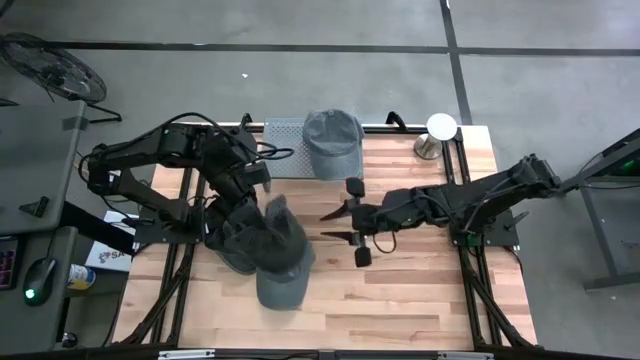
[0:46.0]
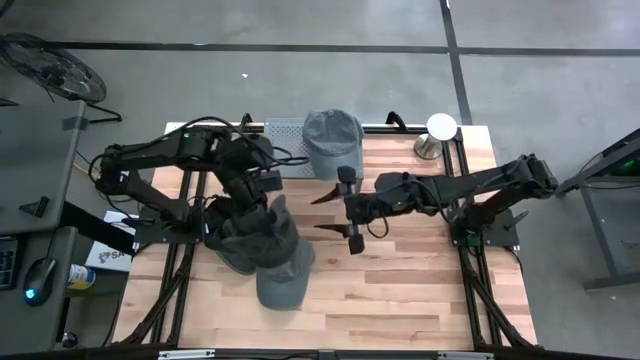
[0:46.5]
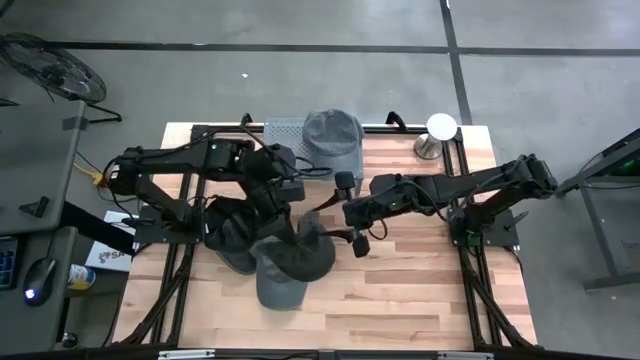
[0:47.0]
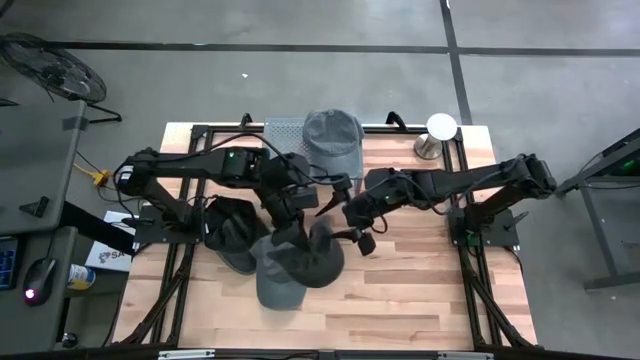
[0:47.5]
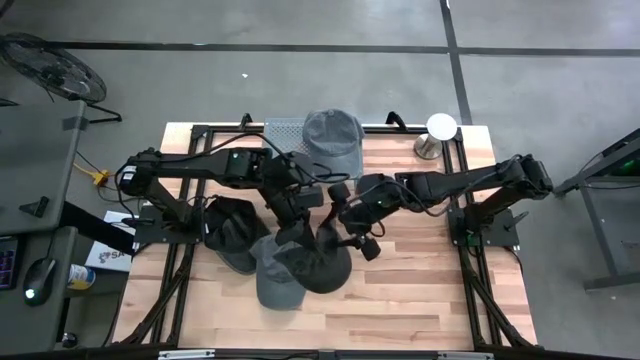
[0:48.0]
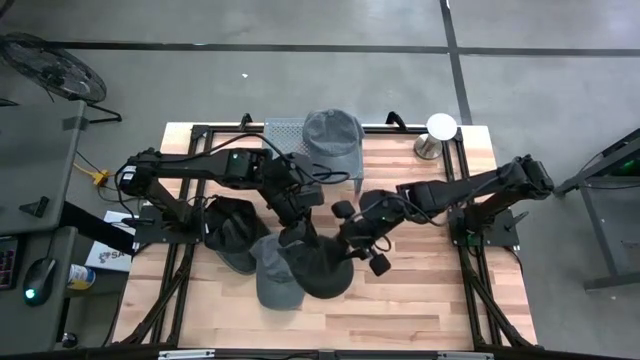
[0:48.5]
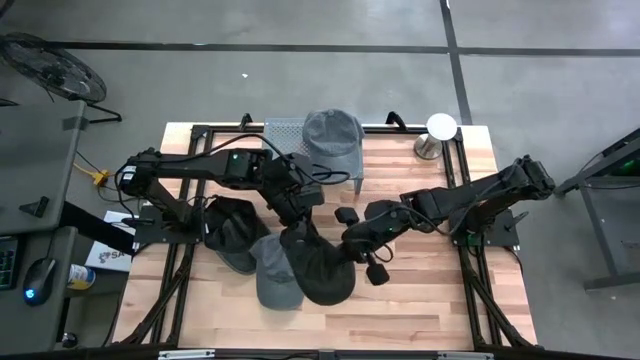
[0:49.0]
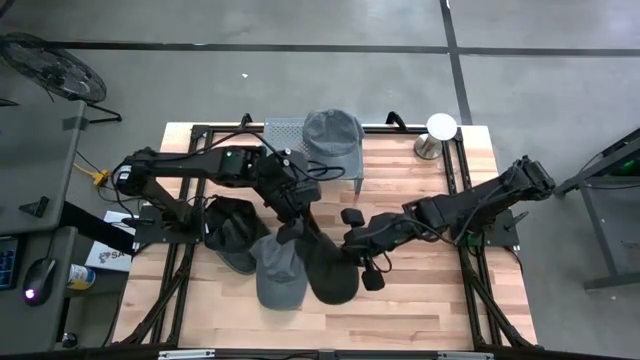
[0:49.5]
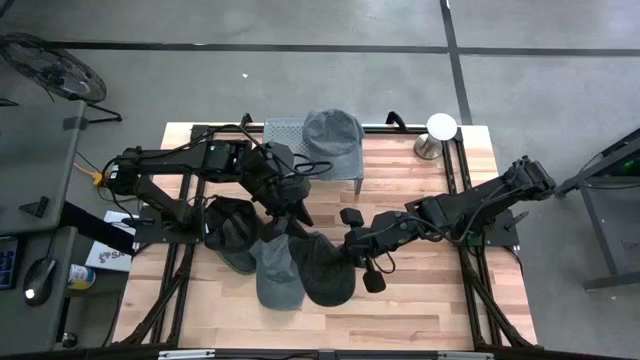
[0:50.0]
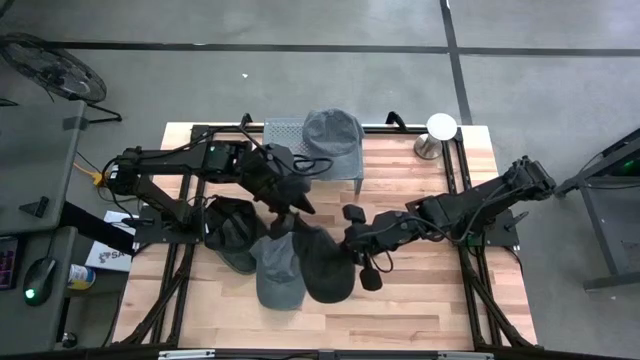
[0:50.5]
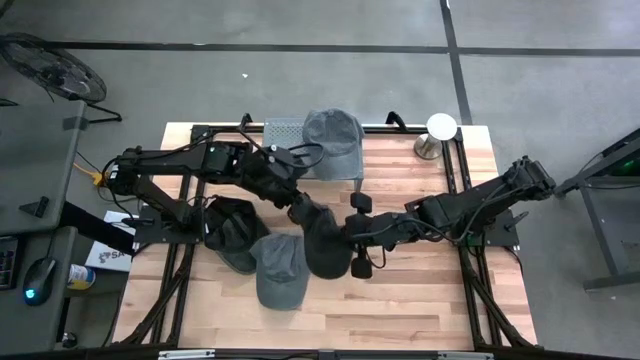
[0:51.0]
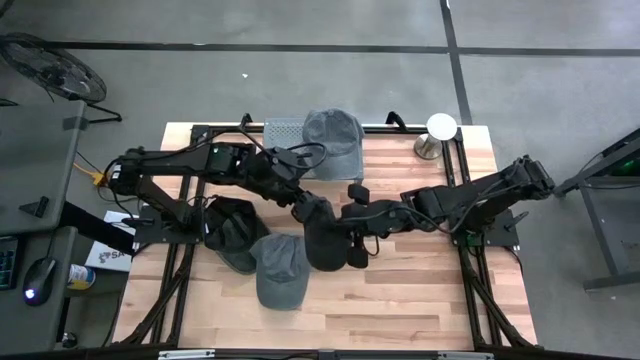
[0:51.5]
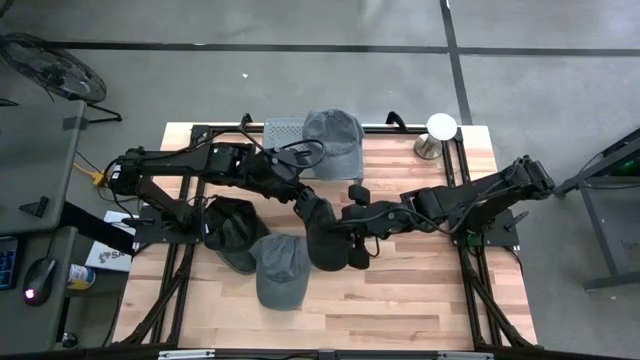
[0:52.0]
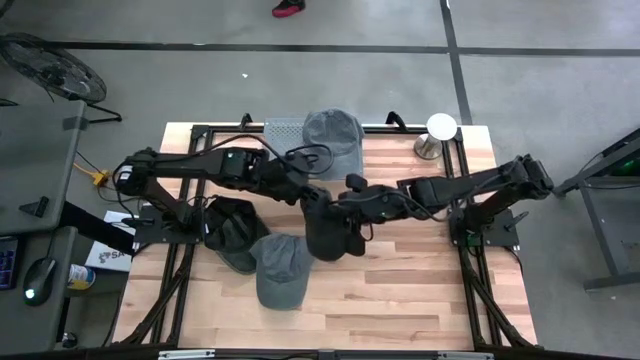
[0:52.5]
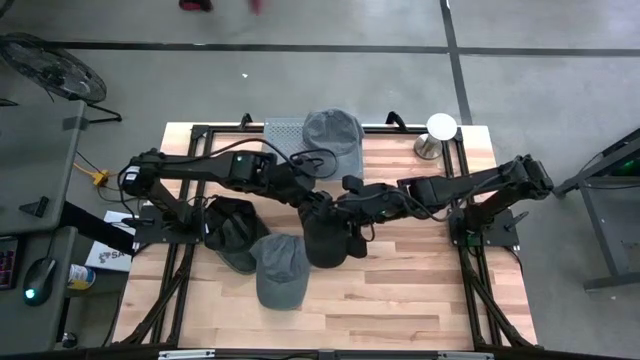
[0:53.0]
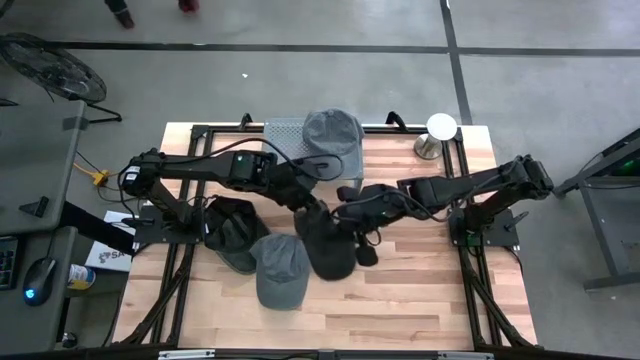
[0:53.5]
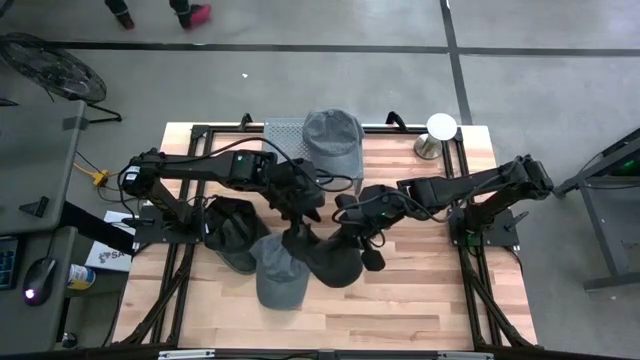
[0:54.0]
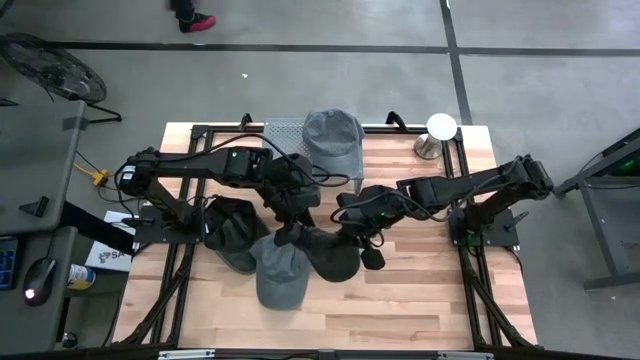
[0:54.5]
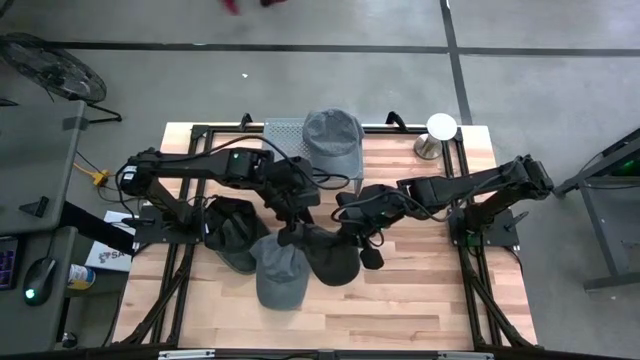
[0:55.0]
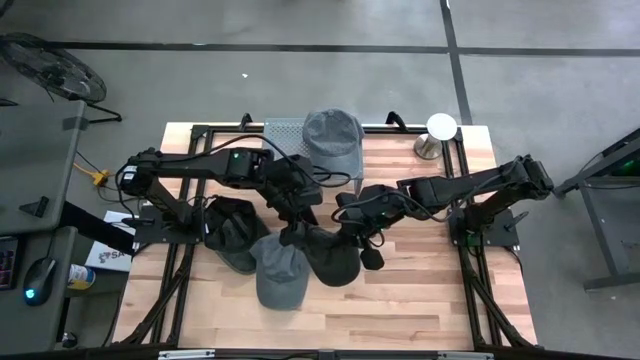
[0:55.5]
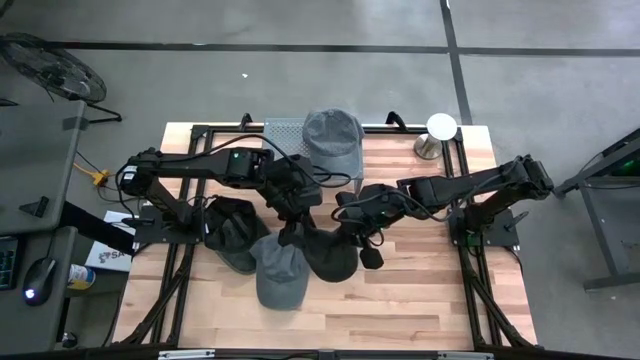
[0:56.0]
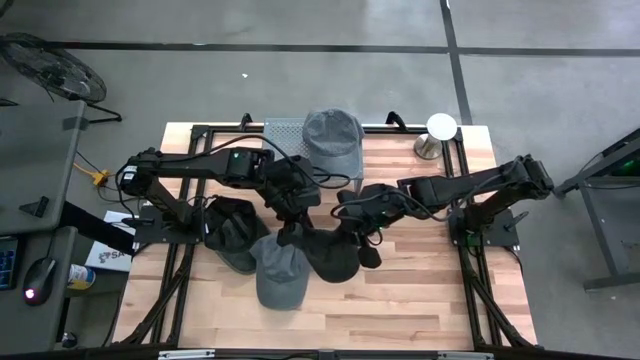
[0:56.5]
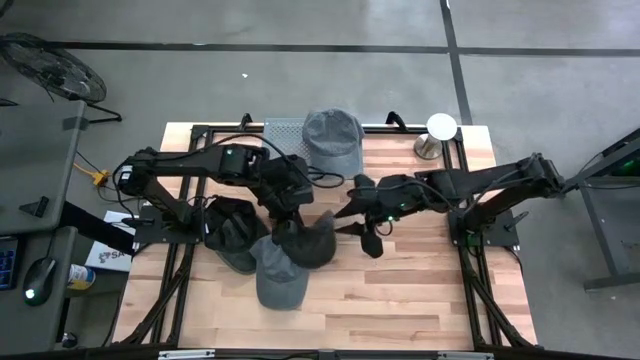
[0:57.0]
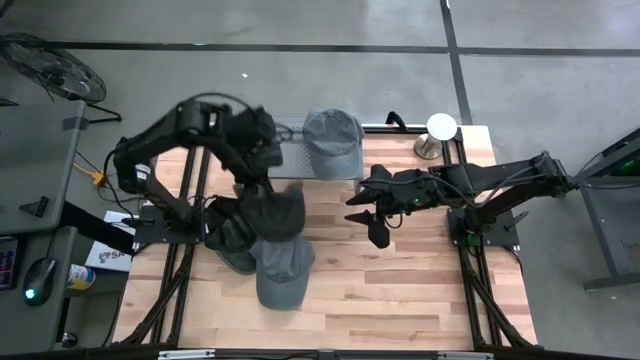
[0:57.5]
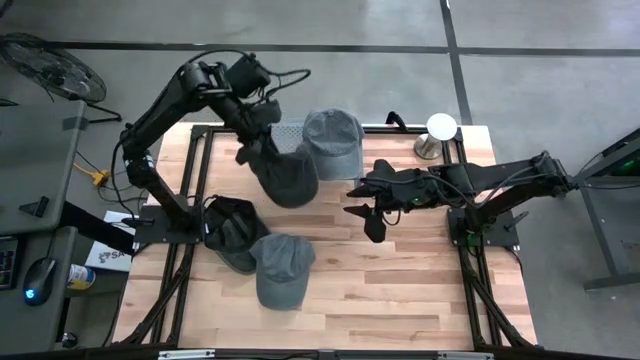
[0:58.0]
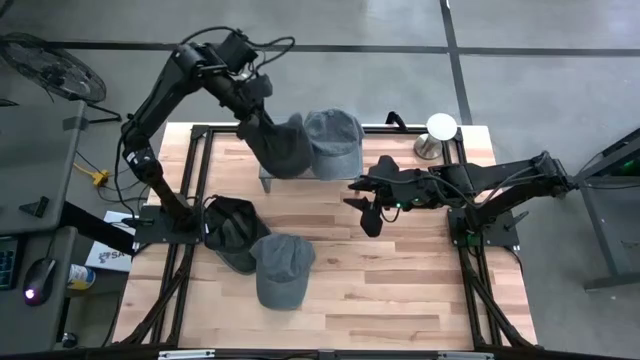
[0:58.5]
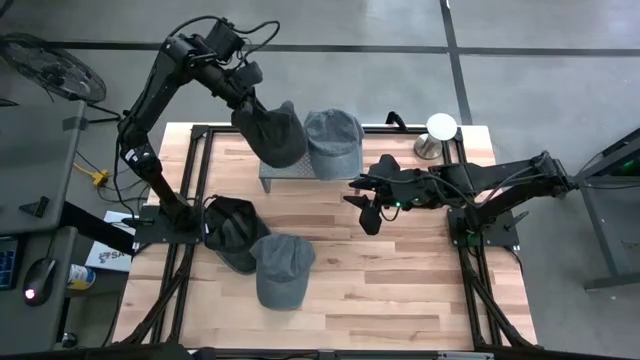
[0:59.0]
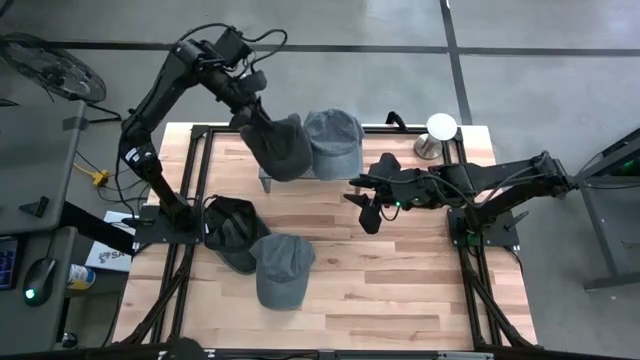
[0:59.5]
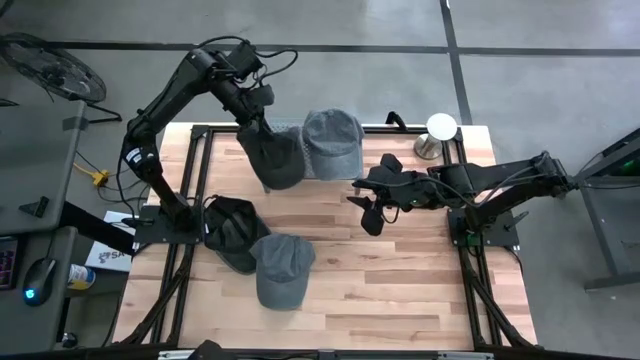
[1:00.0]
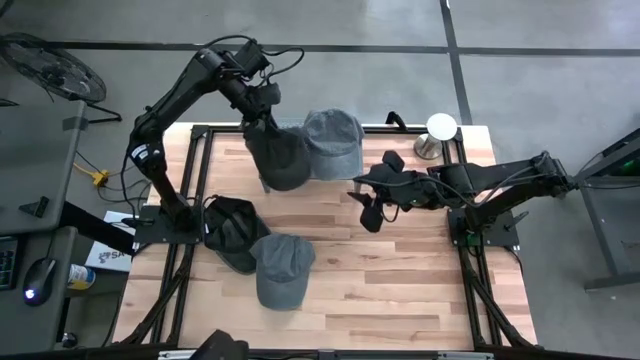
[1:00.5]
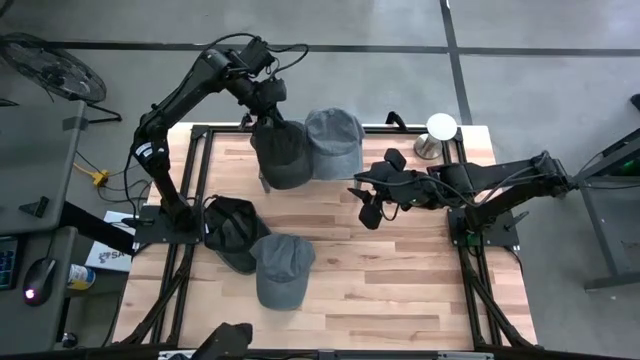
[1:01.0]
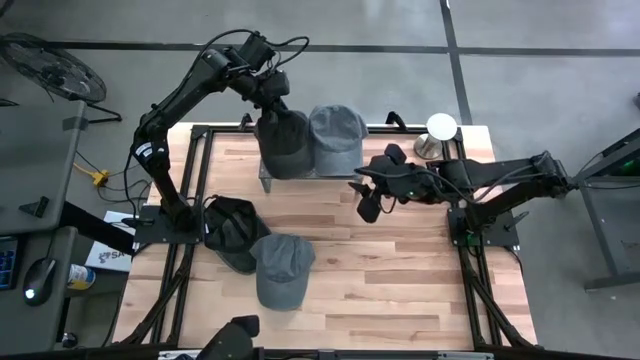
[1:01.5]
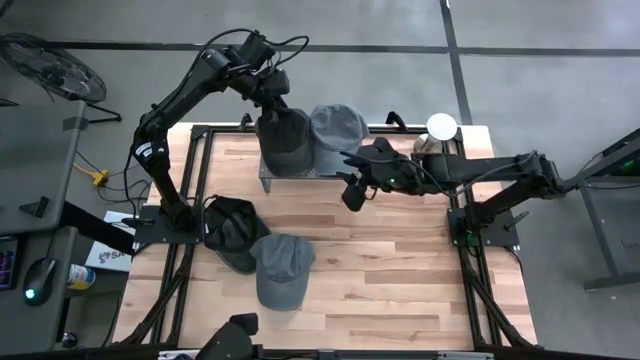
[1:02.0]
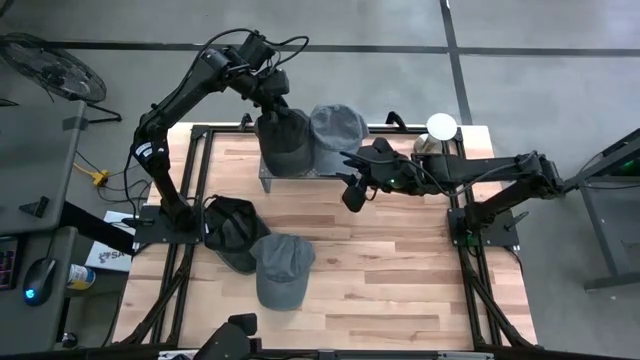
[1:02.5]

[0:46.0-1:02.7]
Task: Pick & Place hat
Put the right black cap on the shelf

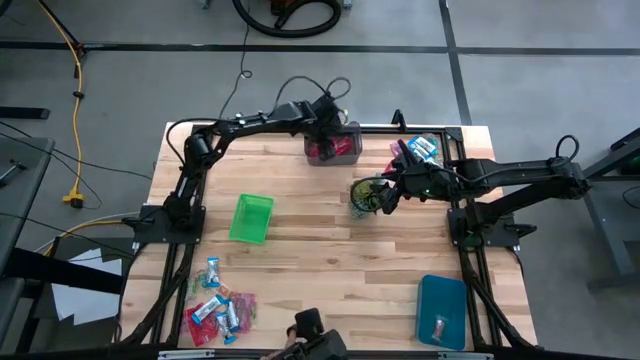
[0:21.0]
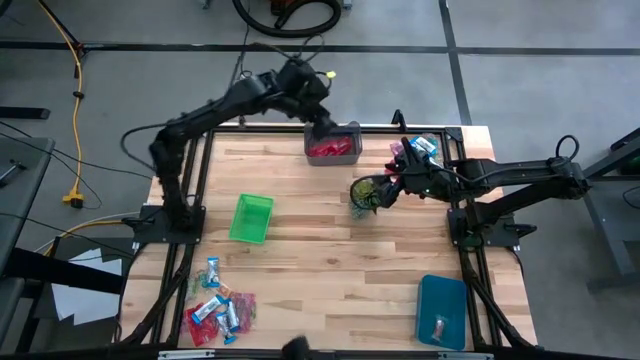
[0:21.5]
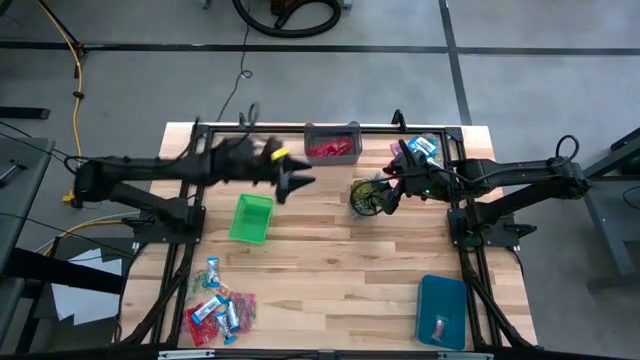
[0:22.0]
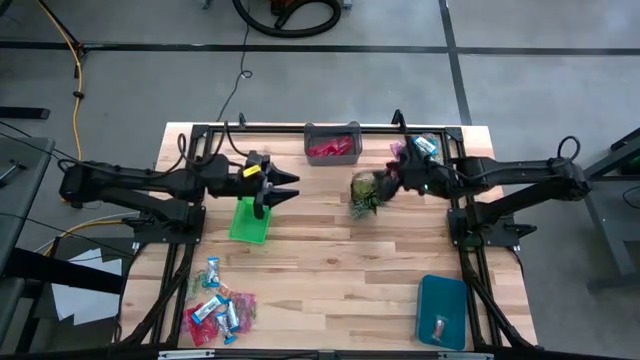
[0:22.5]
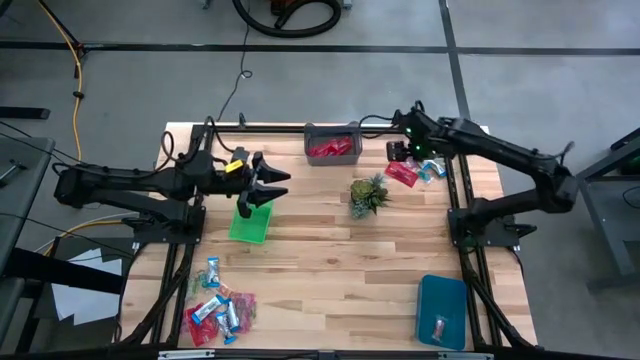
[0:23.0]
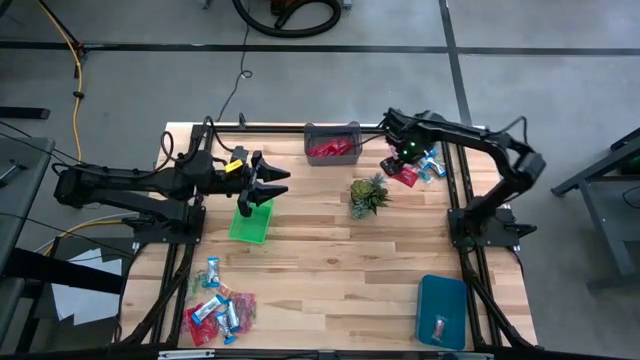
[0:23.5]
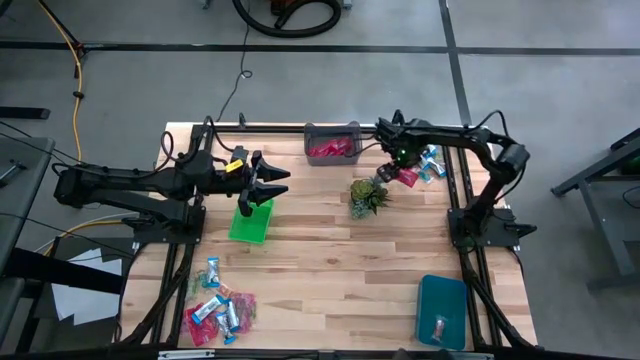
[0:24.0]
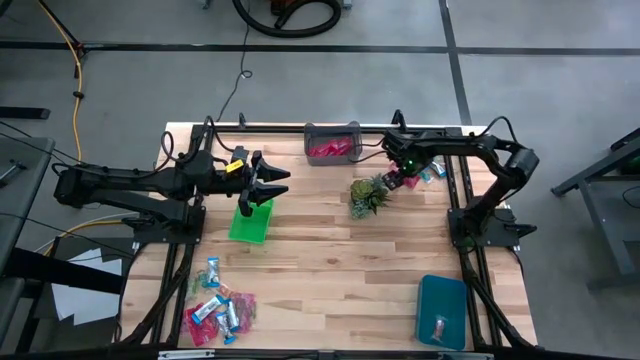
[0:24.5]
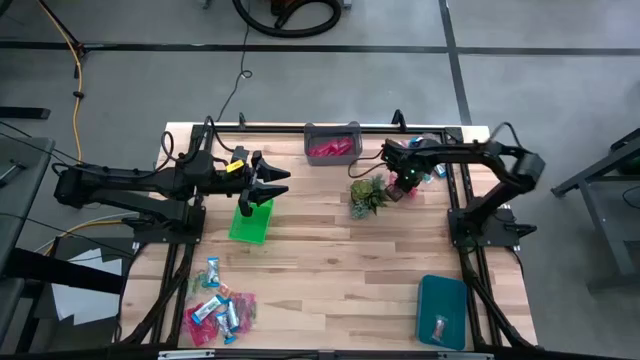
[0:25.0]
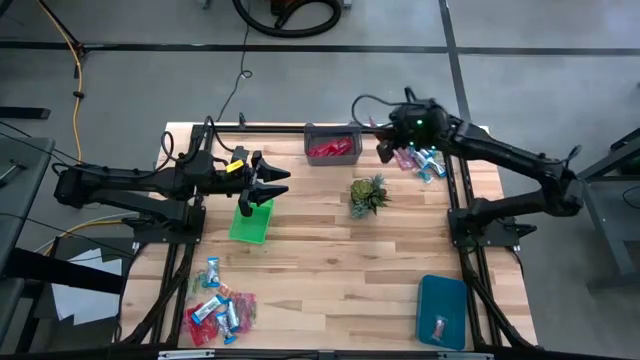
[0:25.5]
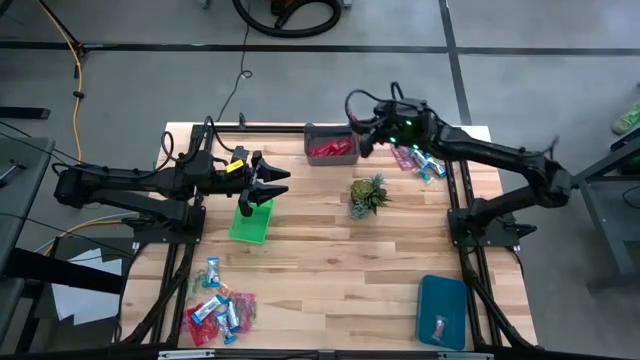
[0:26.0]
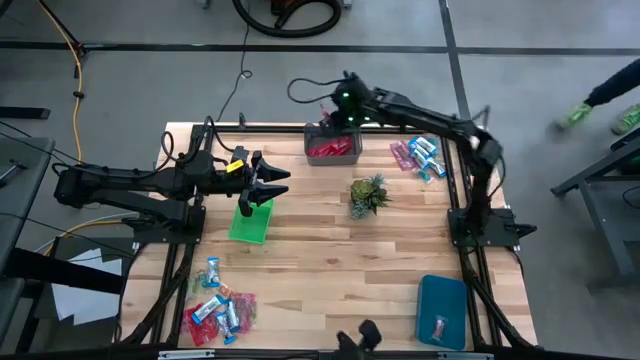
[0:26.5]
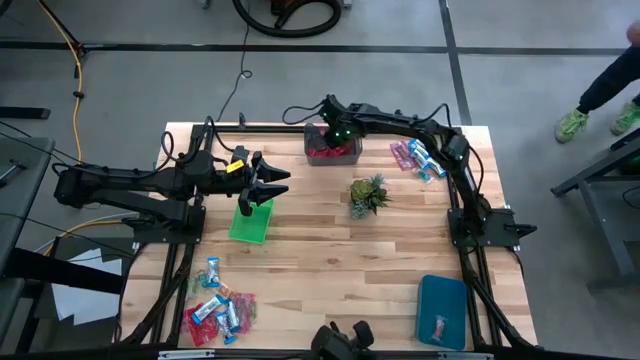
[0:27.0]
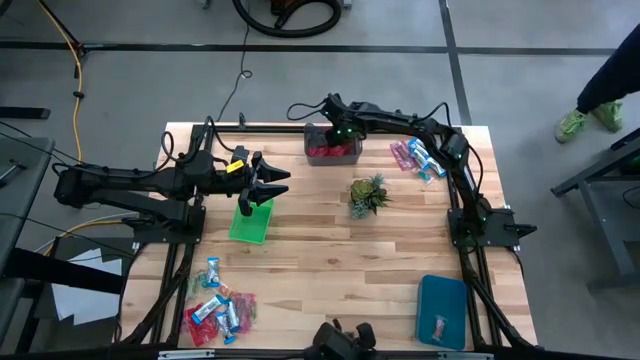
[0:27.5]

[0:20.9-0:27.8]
Task: Sort candy
Put the red candy into the black transparent bin
